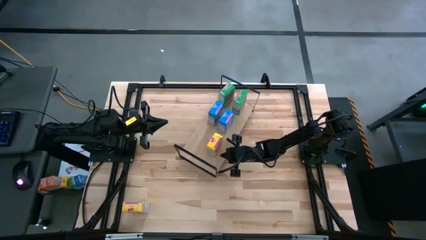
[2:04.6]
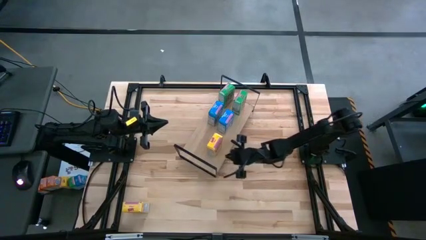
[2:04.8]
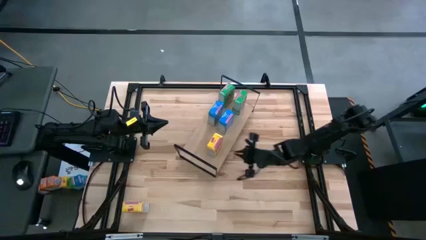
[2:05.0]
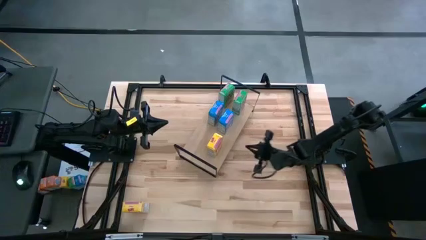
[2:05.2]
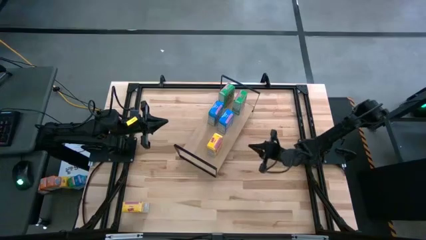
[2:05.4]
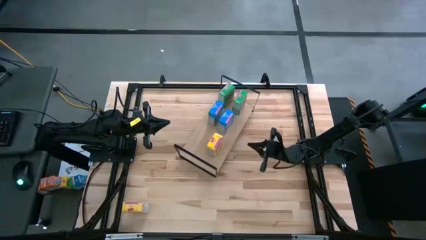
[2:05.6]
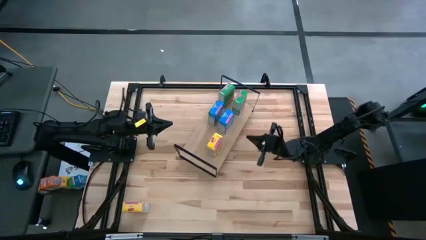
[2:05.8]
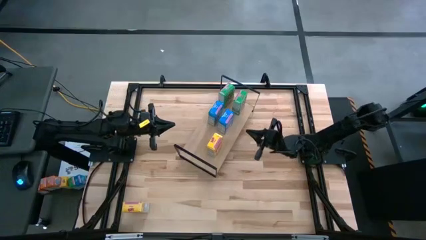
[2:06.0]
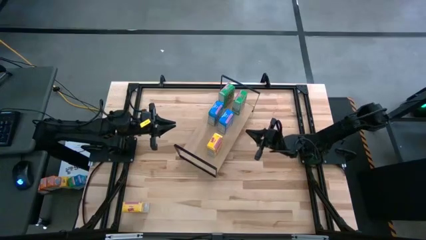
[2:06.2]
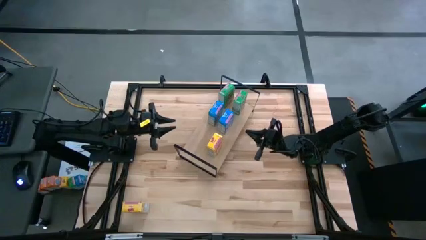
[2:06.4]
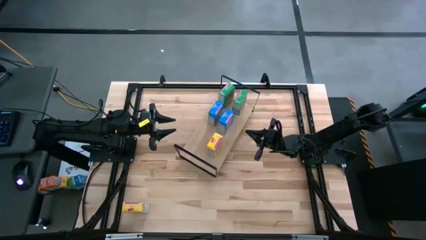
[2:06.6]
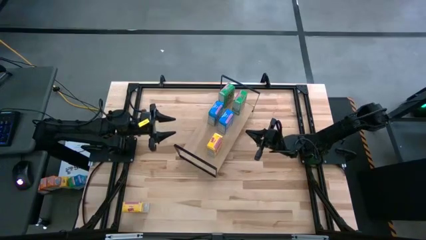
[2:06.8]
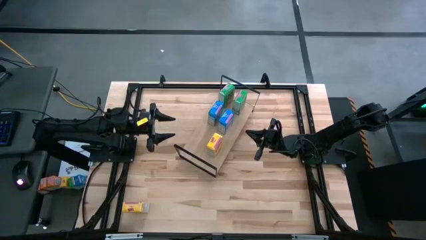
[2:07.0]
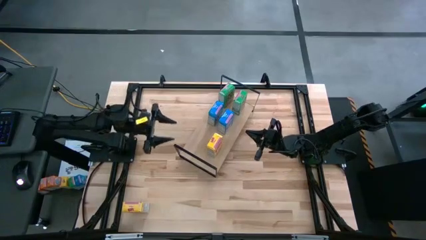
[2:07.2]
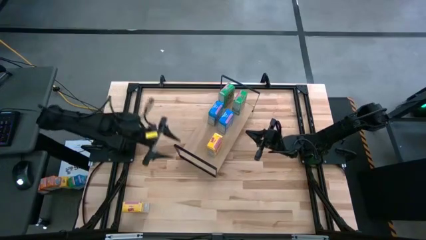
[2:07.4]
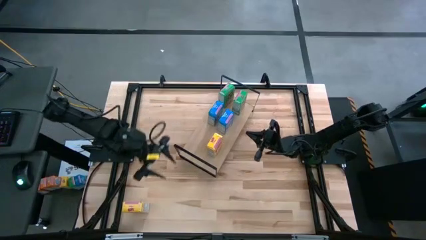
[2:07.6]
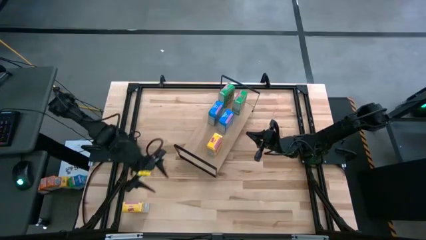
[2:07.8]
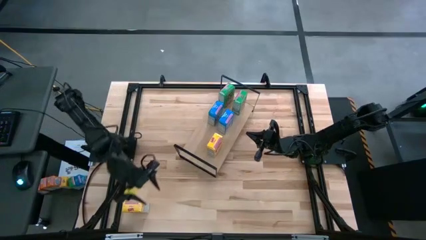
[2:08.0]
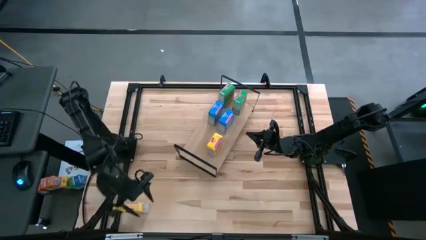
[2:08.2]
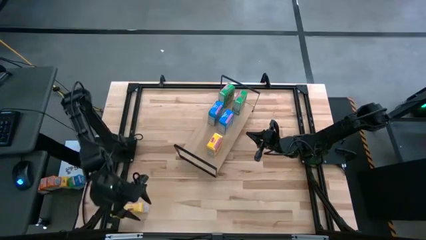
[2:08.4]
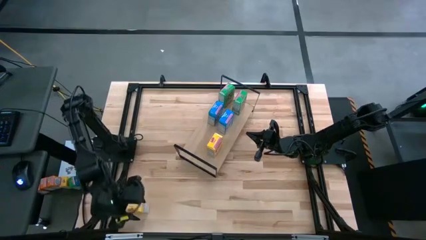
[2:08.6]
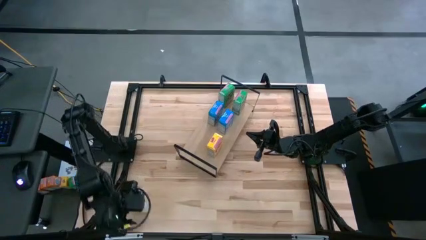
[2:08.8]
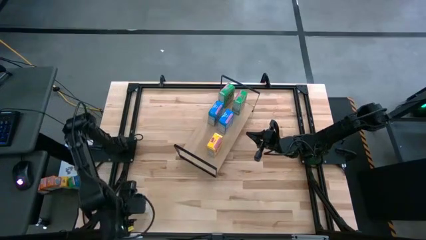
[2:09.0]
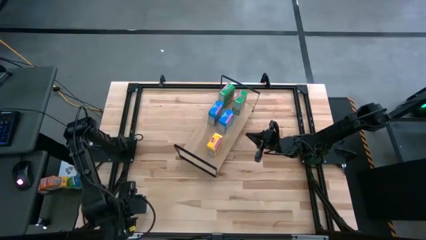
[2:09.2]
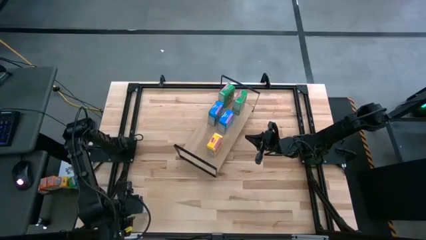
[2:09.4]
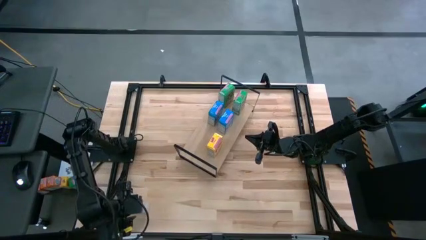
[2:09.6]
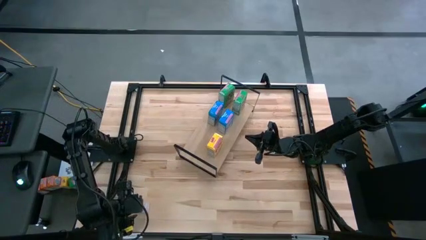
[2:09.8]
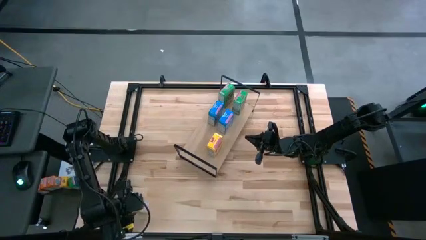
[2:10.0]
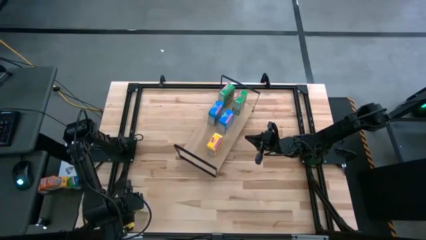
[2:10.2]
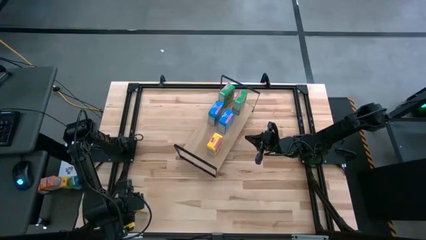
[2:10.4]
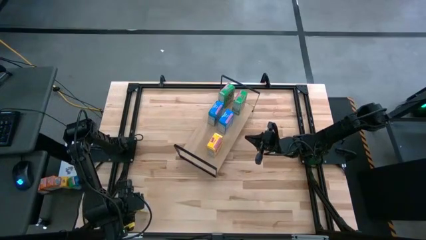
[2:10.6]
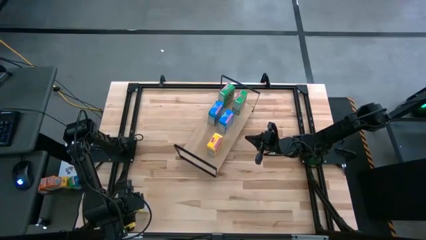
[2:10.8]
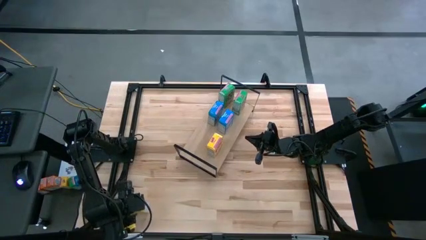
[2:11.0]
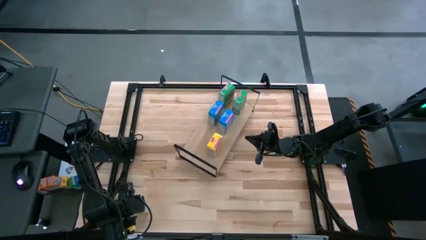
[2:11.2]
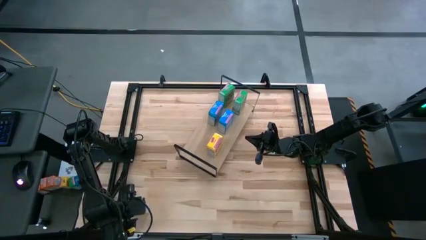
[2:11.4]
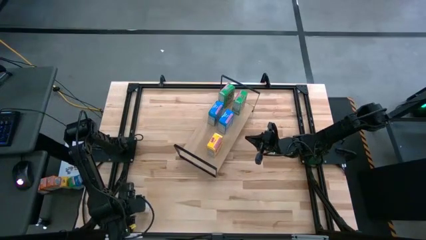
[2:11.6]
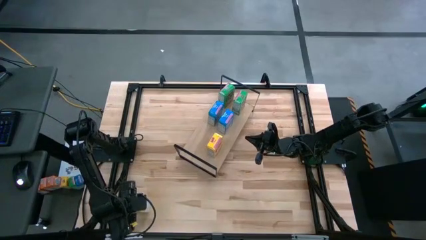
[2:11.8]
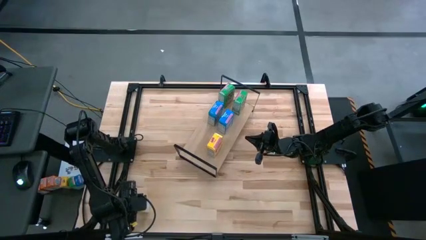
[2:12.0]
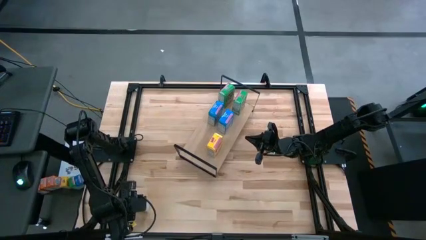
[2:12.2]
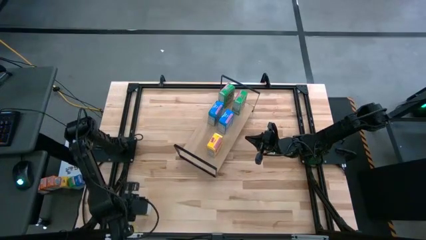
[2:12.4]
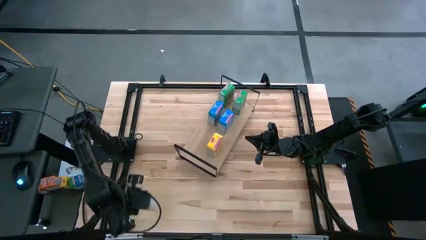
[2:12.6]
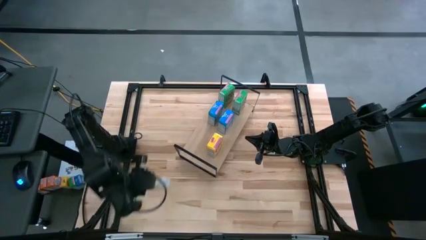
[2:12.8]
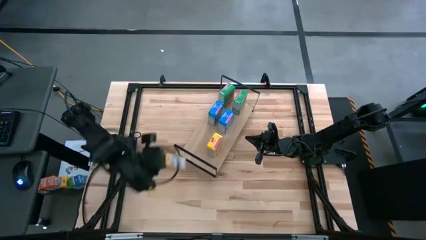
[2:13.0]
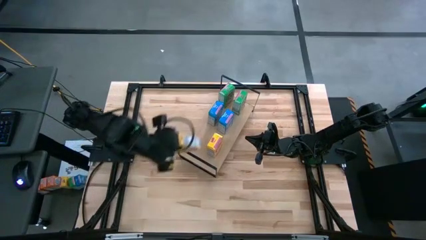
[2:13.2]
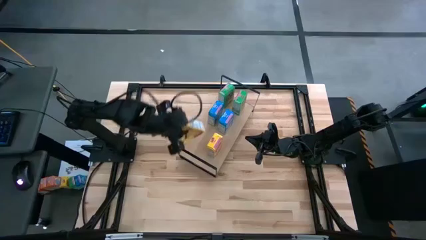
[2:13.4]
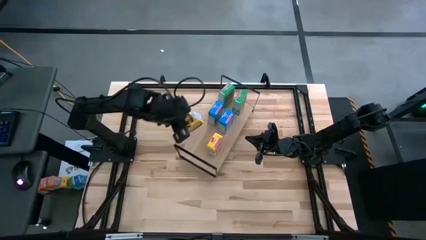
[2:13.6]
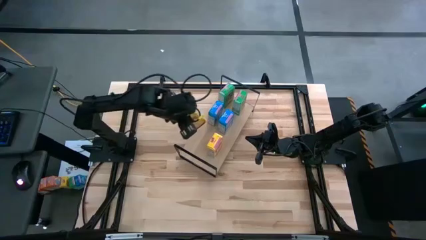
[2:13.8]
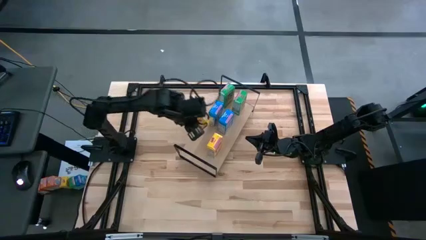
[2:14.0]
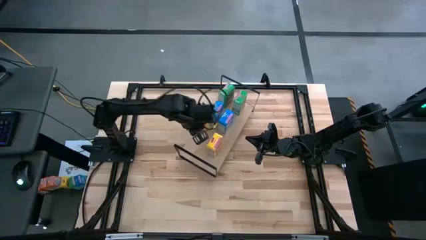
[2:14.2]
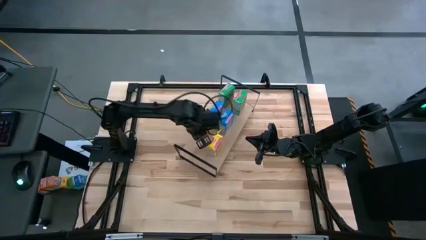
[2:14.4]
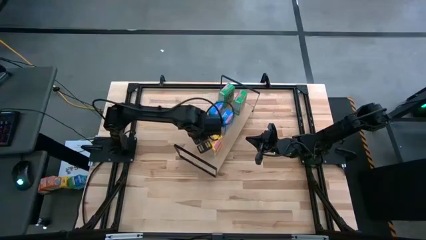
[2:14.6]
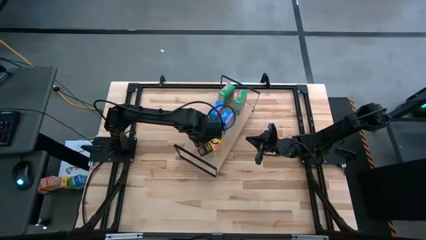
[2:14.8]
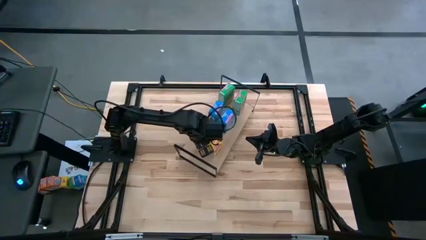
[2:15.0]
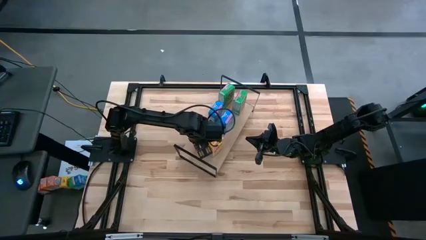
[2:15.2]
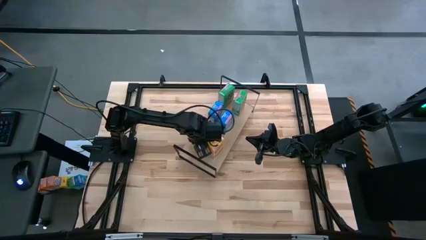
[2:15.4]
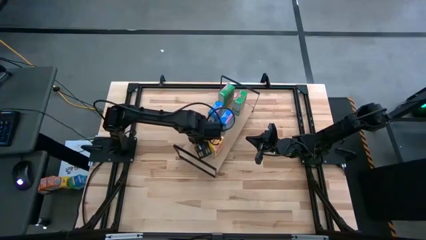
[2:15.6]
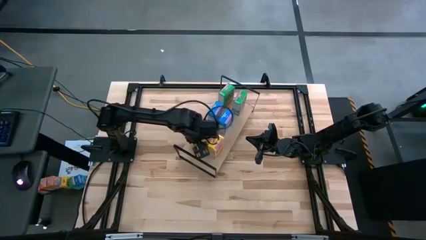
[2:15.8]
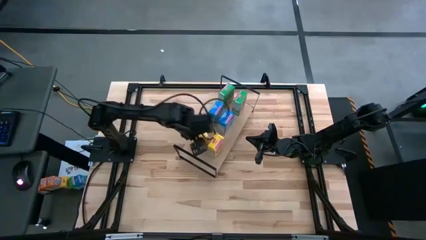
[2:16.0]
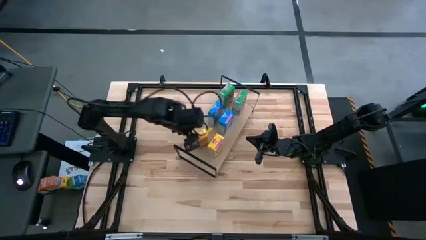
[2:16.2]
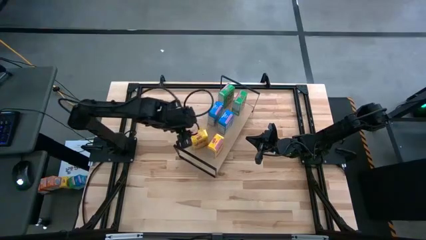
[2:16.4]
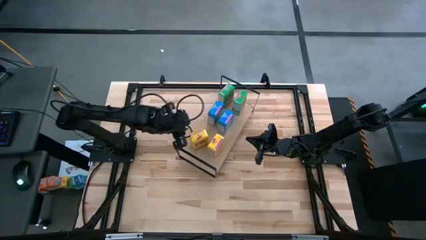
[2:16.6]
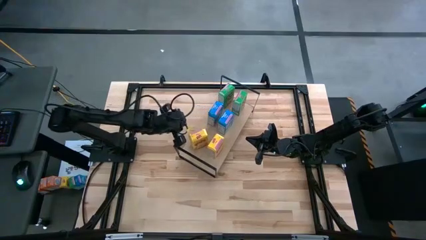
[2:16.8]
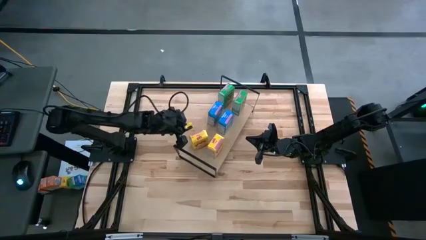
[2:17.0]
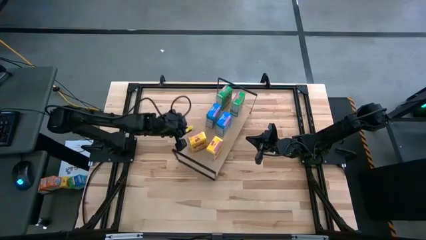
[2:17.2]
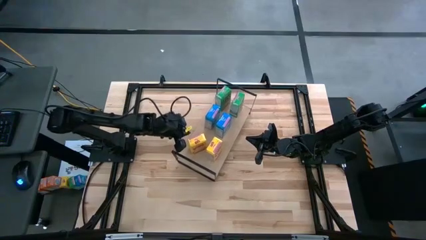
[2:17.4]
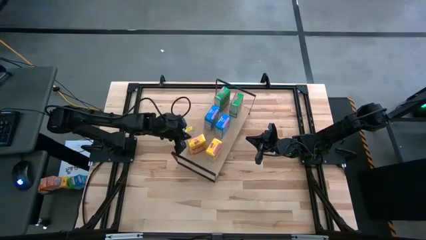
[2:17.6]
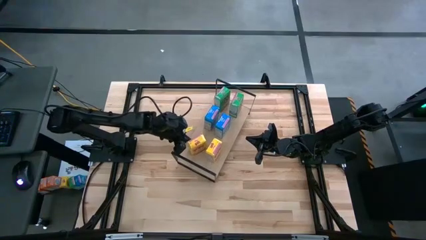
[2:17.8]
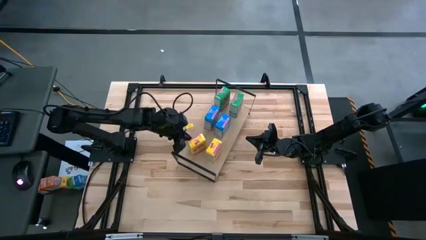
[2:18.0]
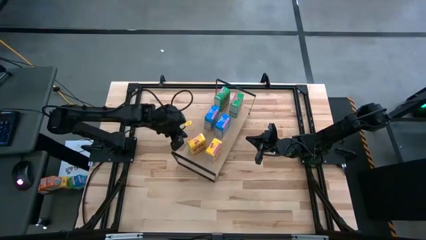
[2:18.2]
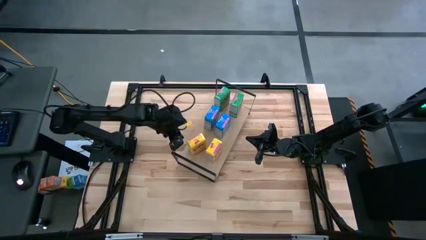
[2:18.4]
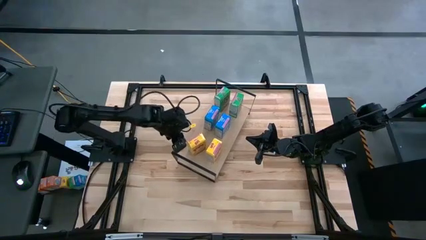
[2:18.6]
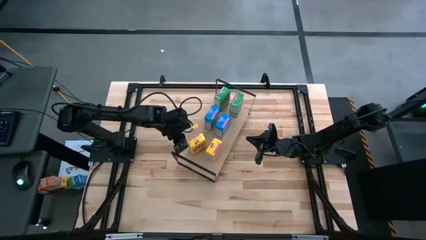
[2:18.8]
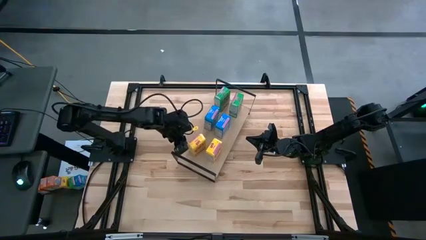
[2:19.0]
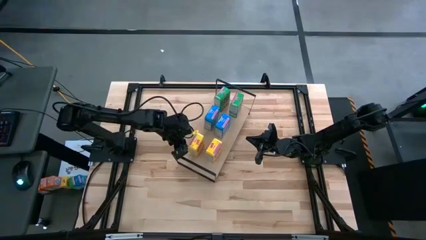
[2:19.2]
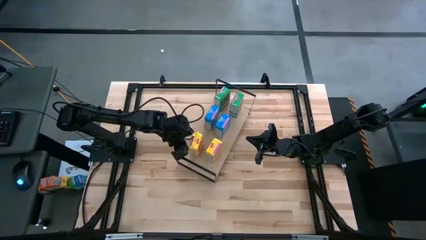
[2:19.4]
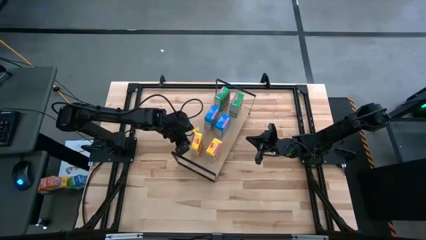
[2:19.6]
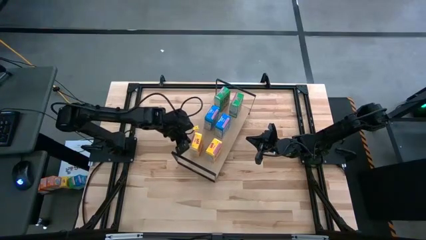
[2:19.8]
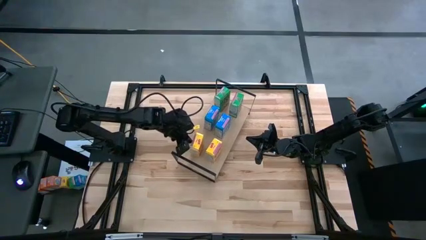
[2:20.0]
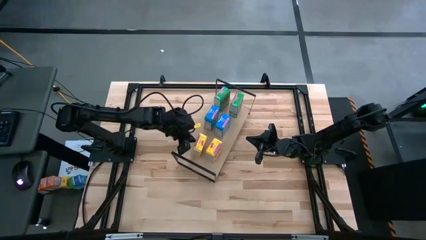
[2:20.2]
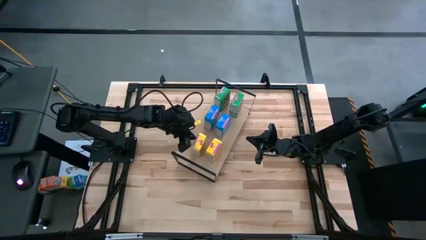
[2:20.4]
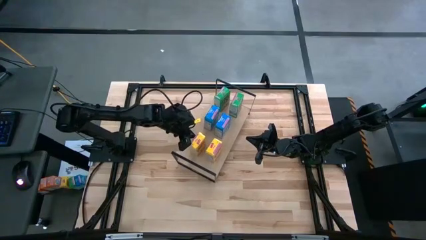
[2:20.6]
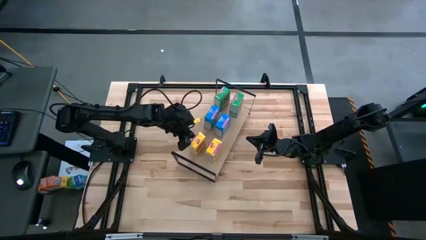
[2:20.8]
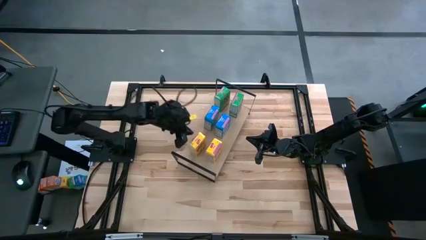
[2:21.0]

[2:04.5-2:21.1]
Task: Stack cereal on shelf
Put the yellow cereal box aligned with the other yellow cereal box on the shelf
